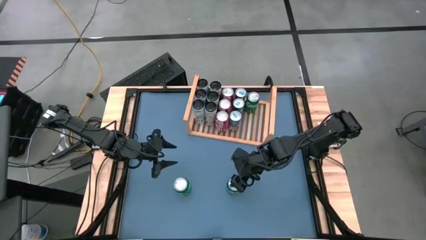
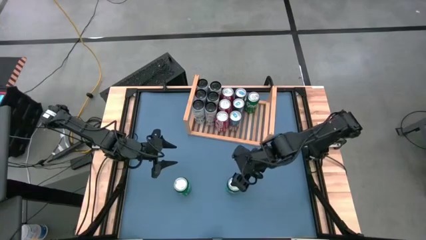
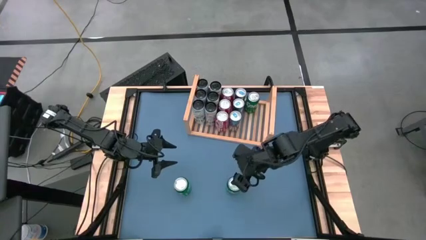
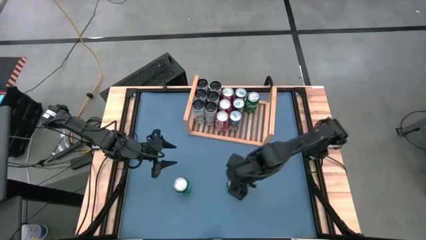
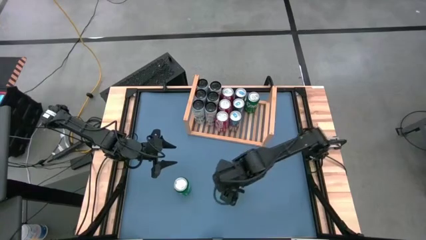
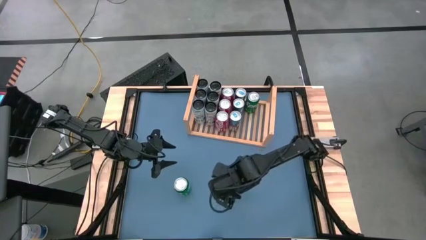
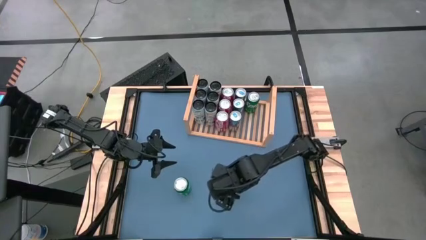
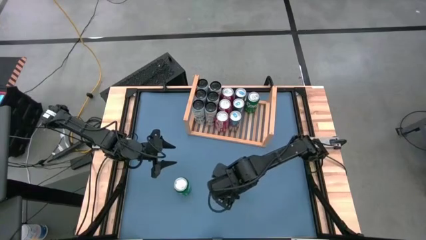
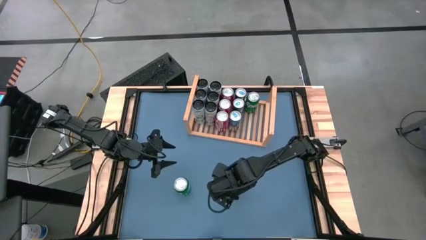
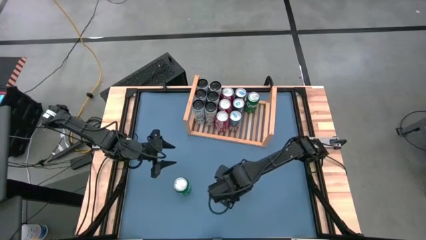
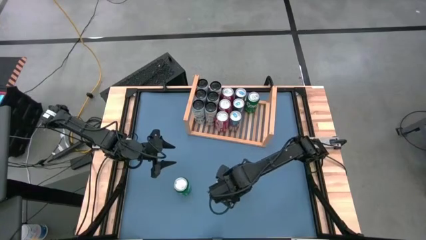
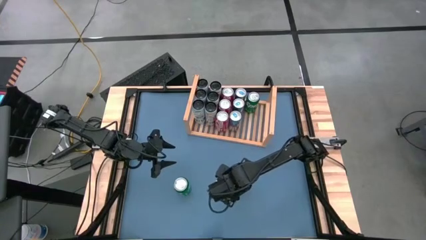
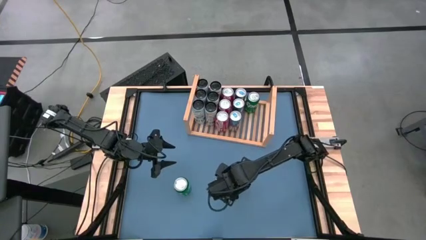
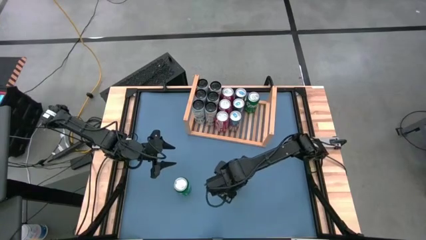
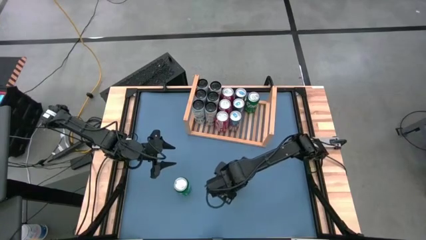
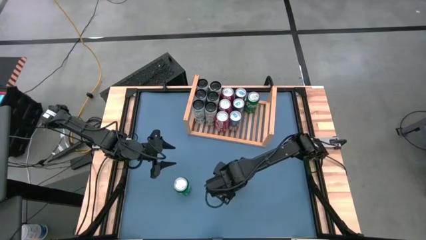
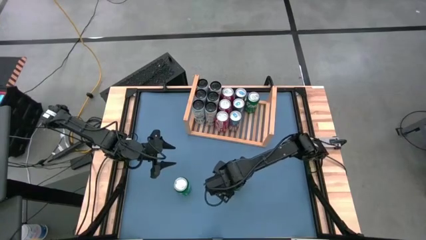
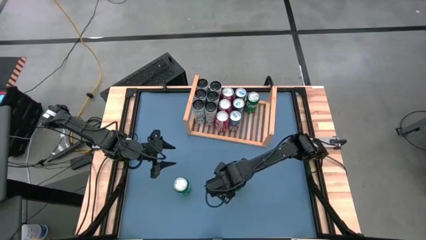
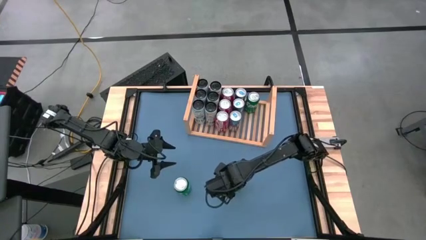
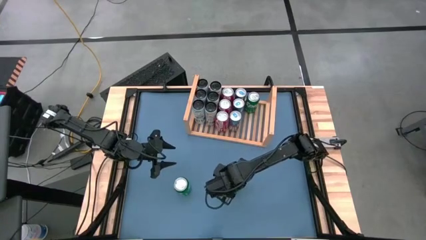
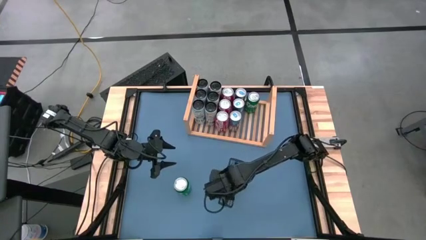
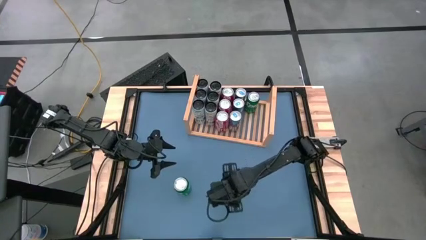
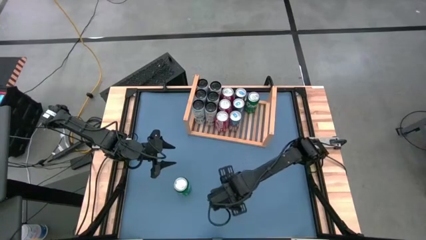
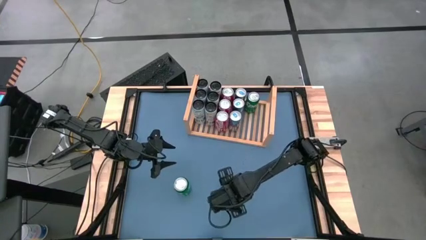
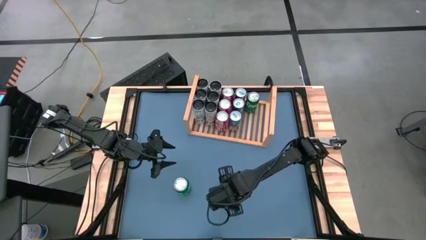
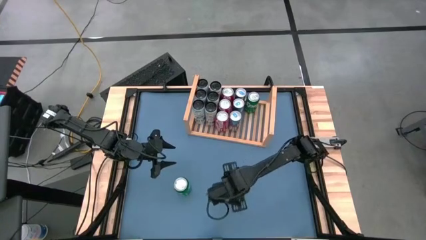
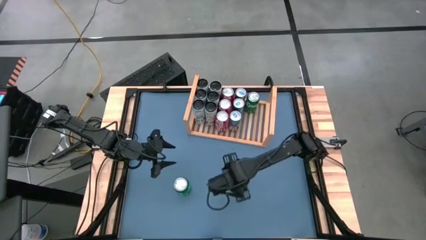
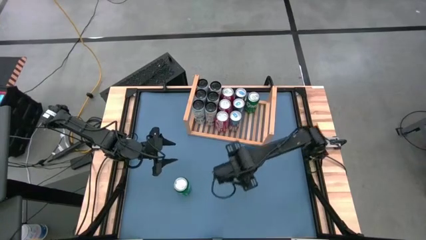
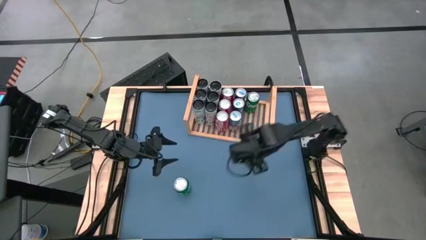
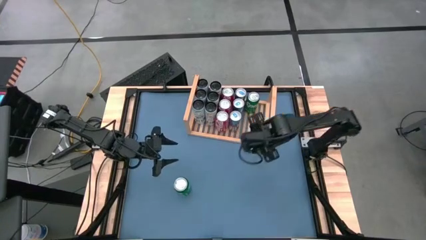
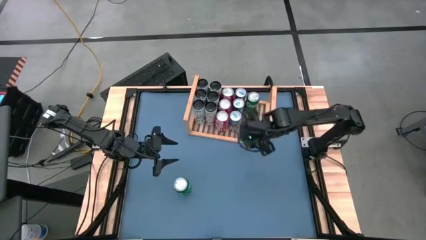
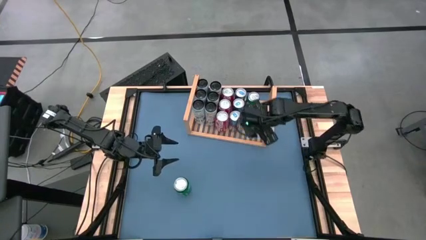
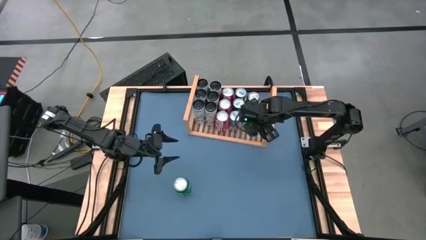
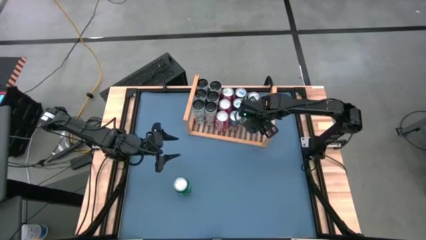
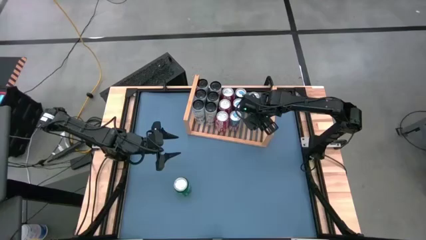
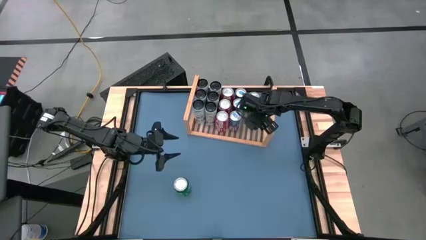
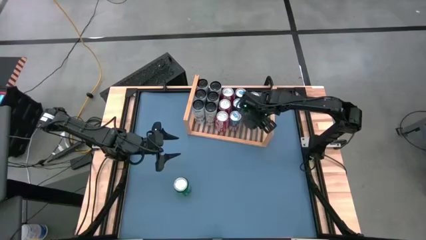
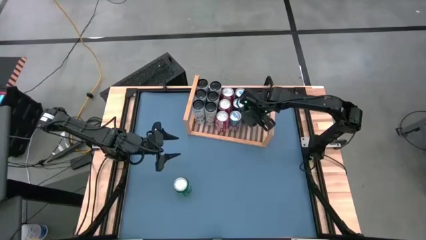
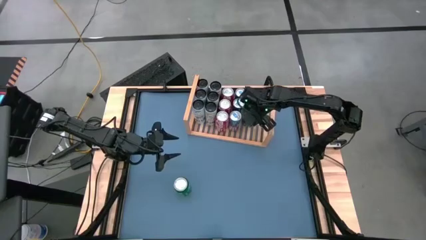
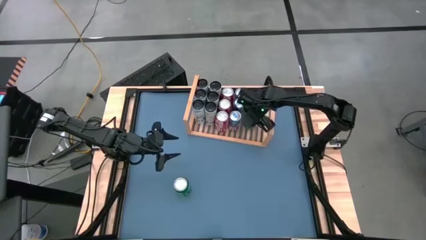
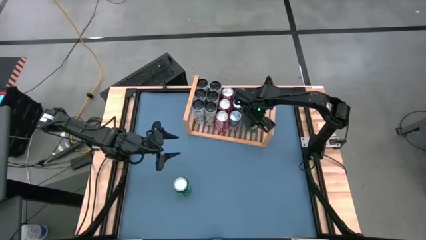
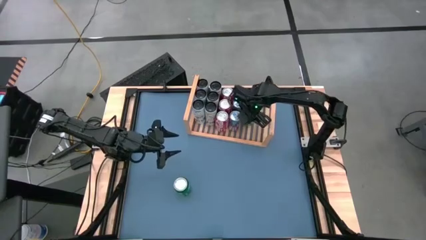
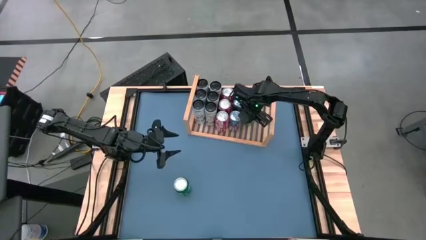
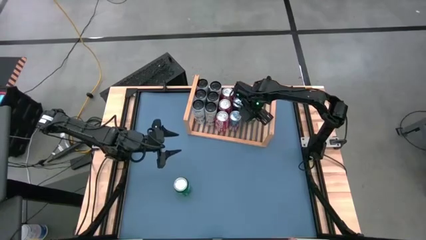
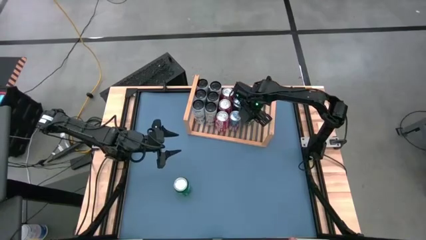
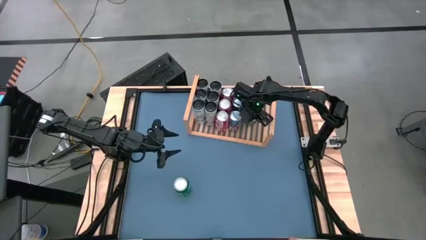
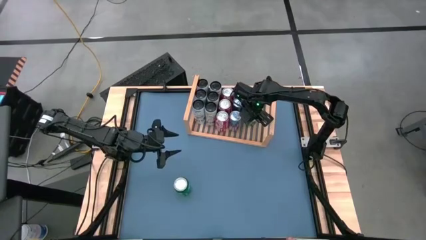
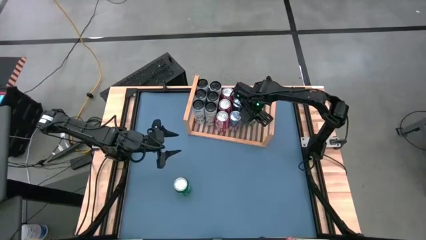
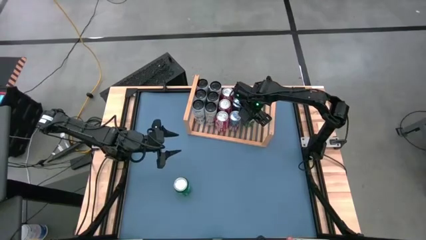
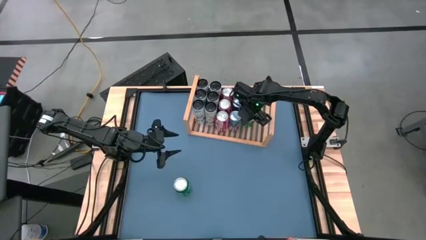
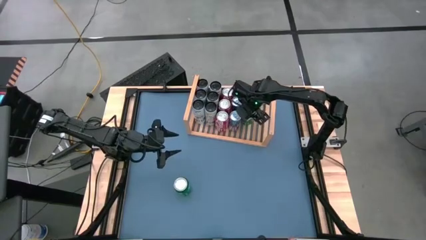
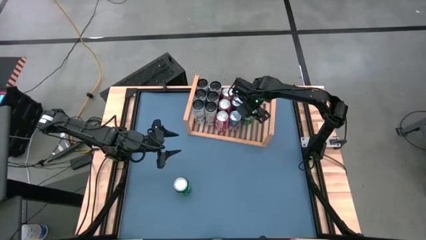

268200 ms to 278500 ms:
Task: Place canned beverage on shelf
Put the green soda can on the shelf aligned with the other green soda can

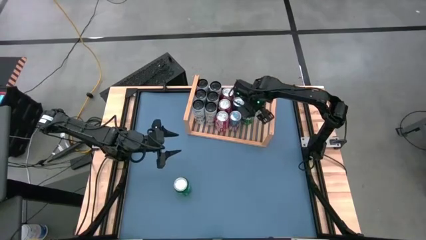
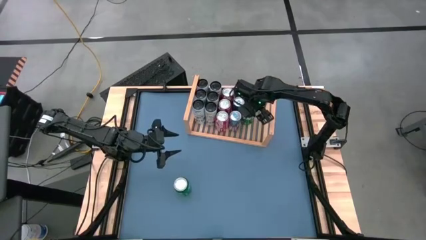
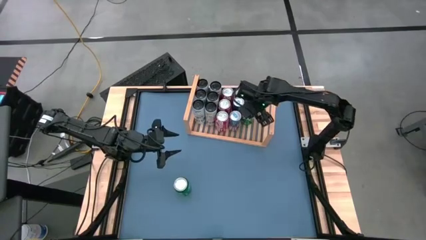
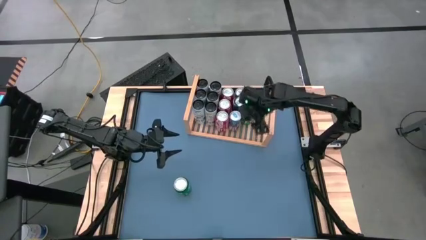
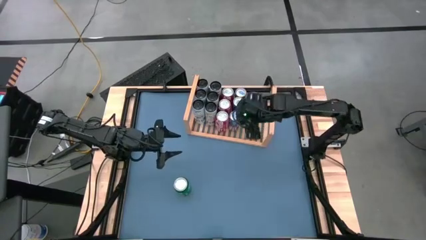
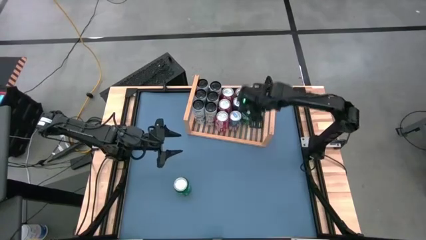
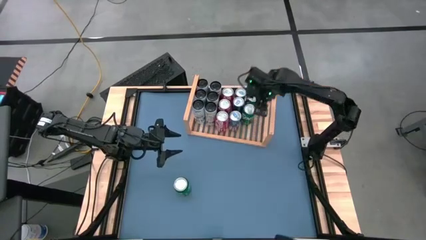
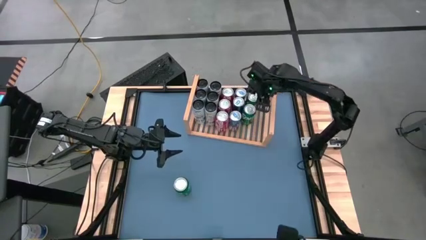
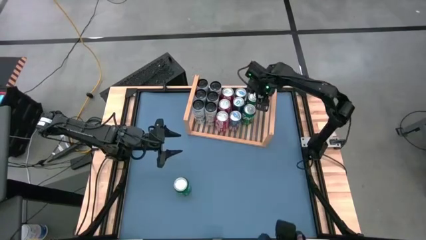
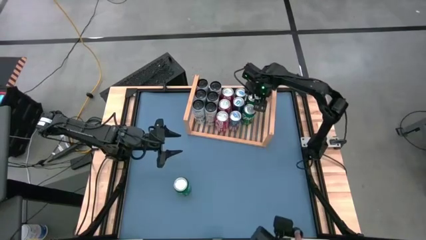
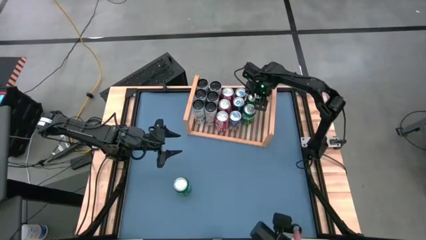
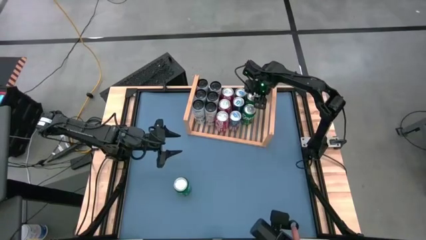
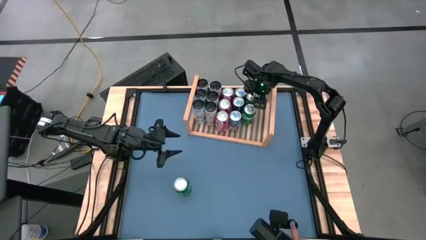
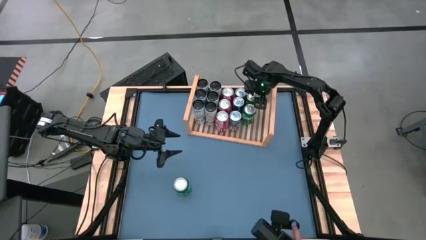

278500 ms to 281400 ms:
Adjust the green soda can on the shelf

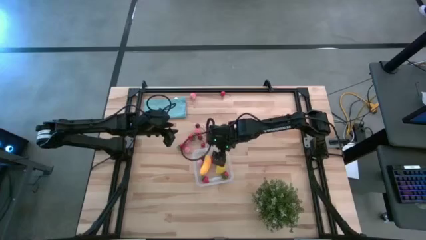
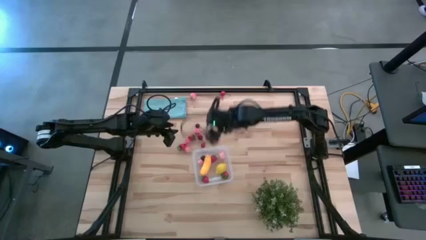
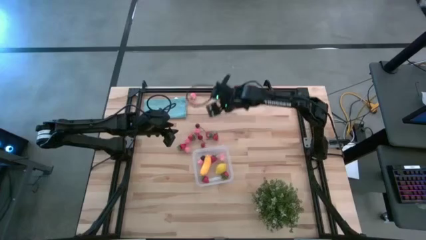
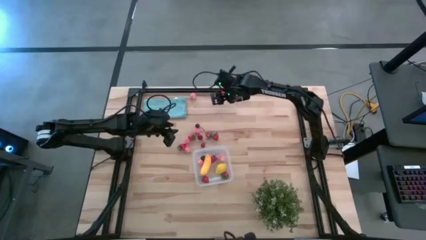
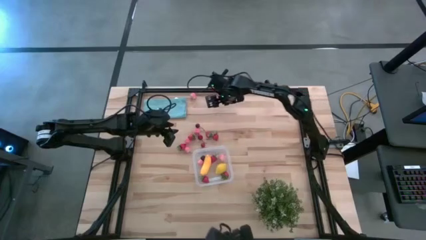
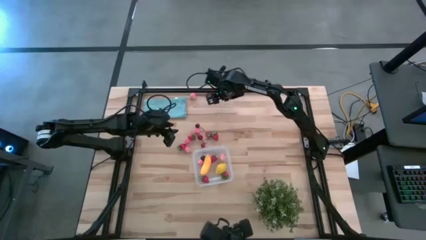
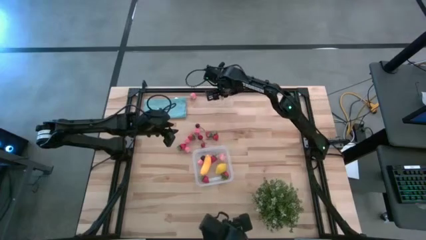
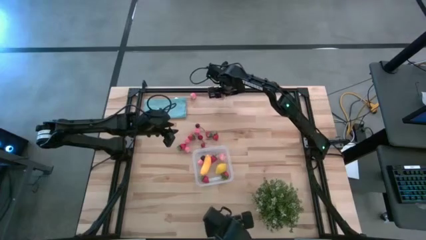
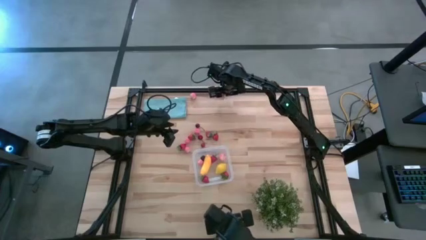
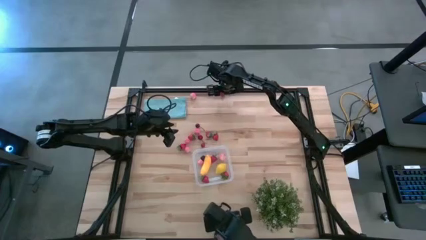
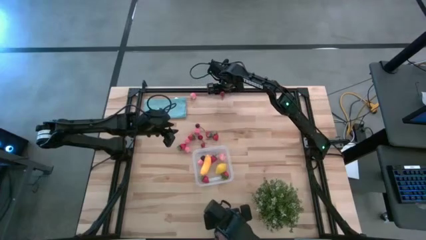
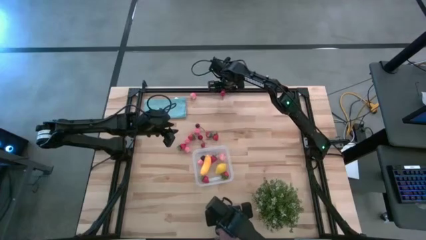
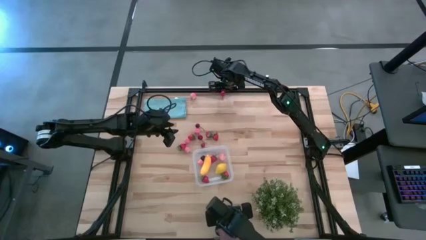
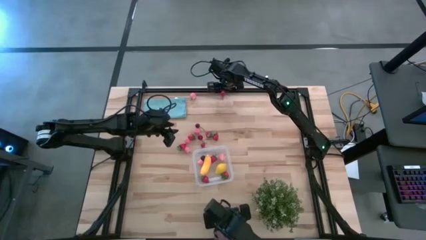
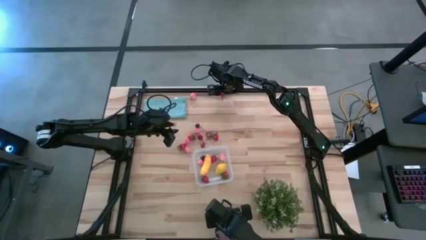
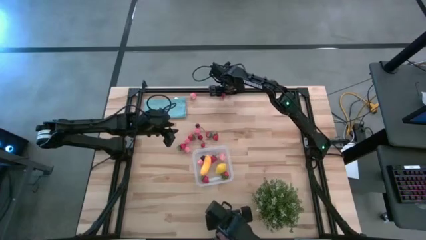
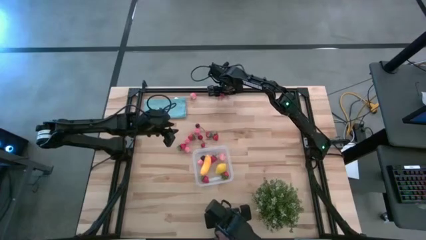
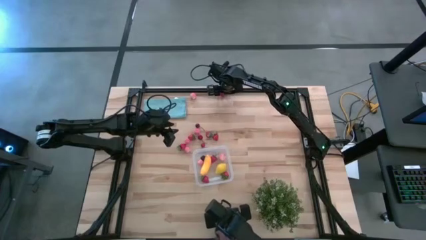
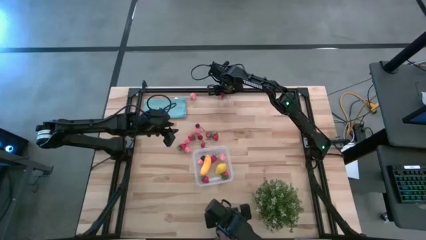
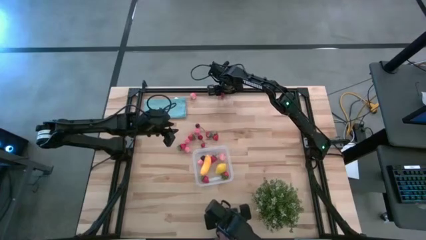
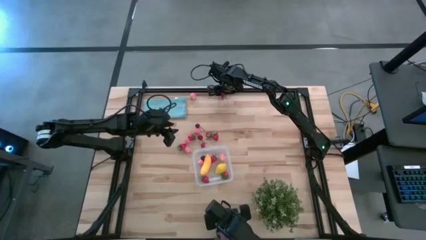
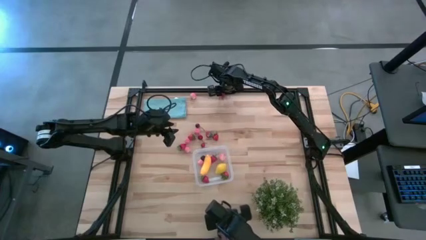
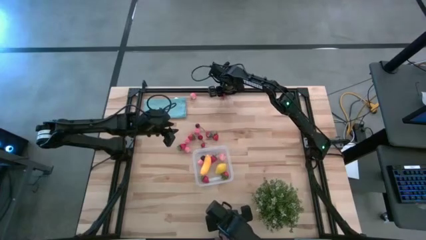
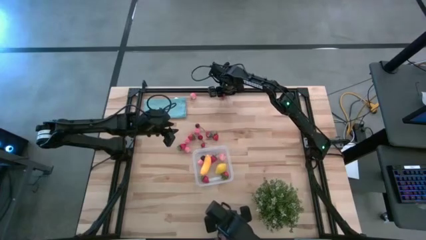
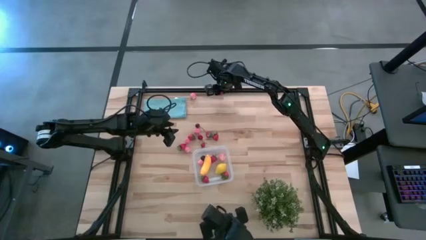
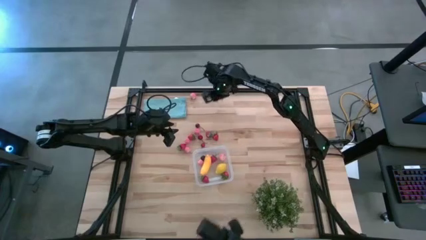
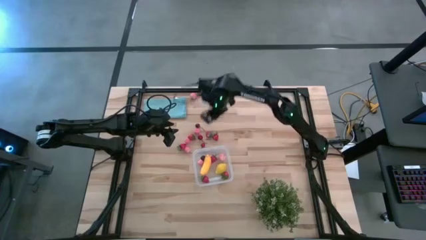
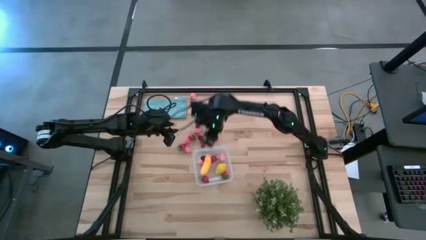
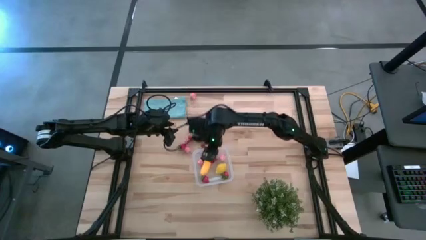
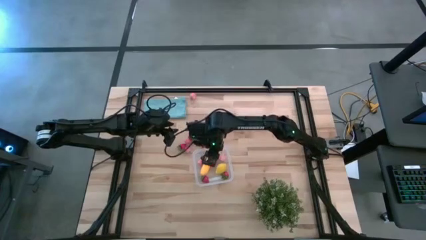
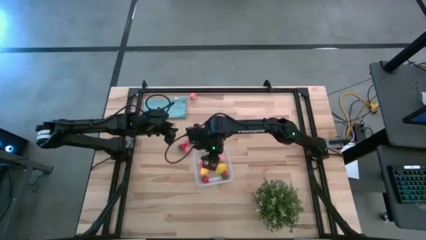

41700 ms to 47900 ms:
Task: Pick and placing Produce into tupperware
Put the red cherry into the transparent bin
